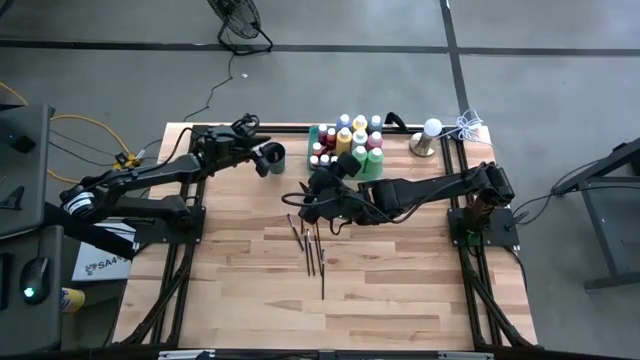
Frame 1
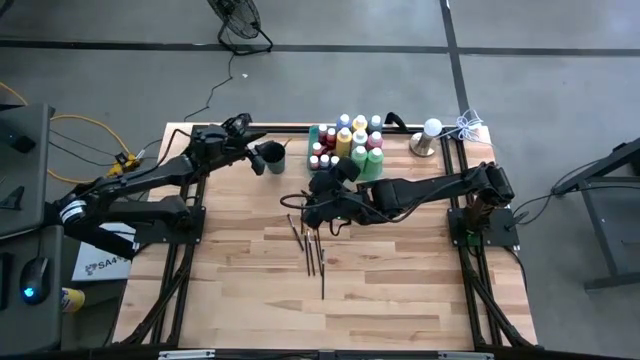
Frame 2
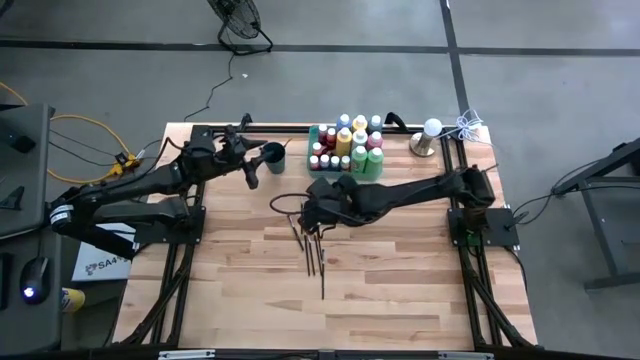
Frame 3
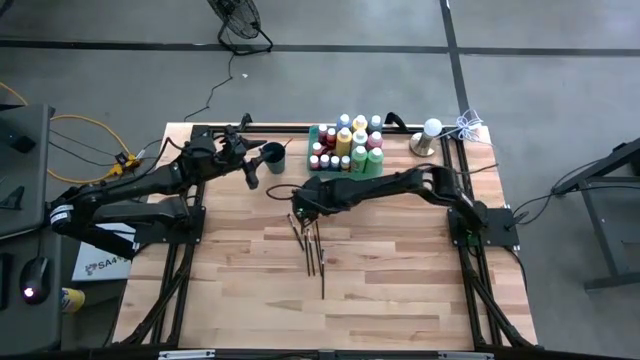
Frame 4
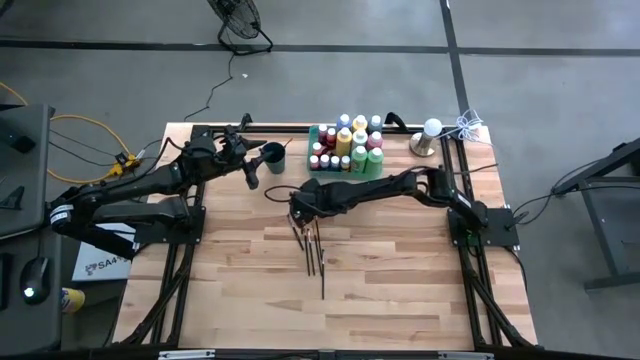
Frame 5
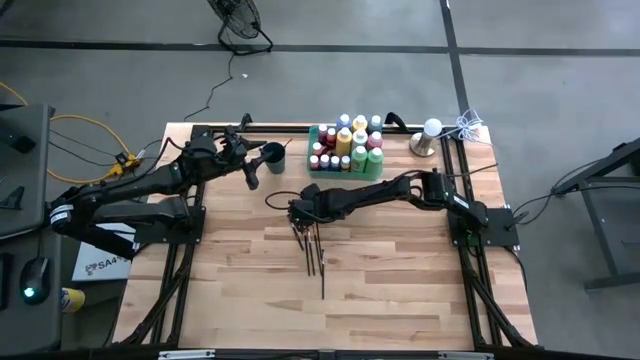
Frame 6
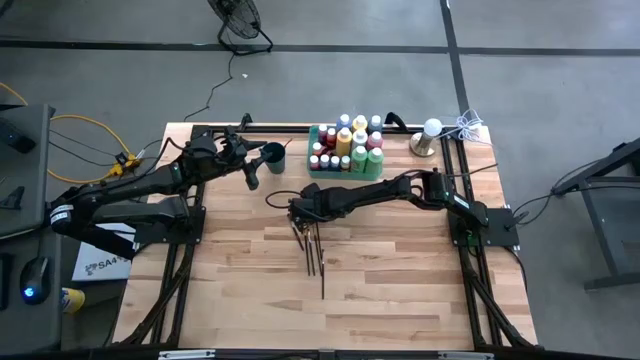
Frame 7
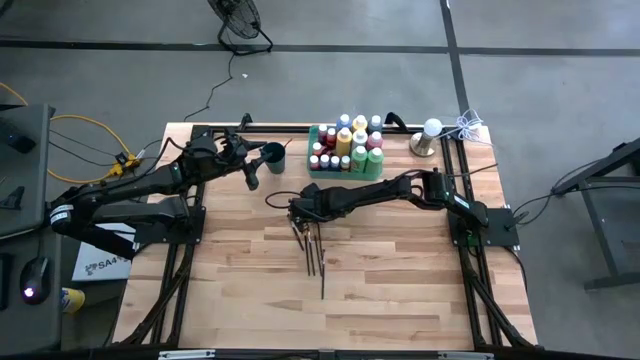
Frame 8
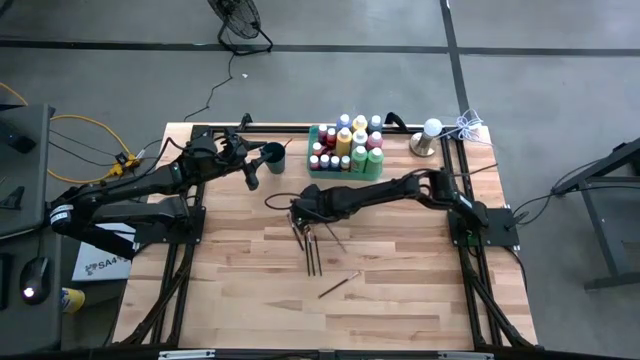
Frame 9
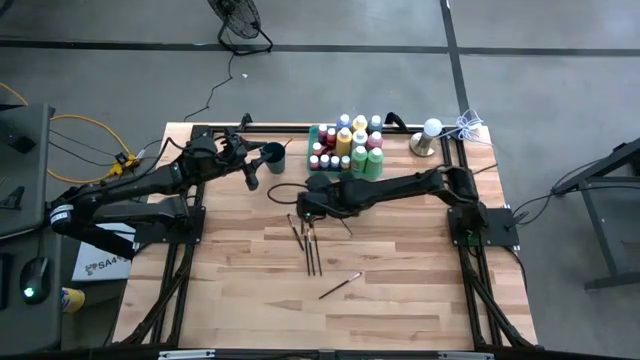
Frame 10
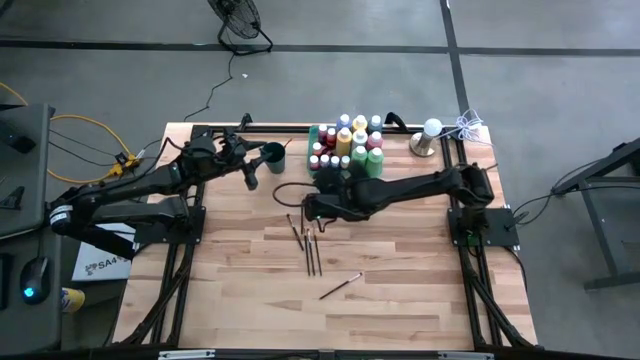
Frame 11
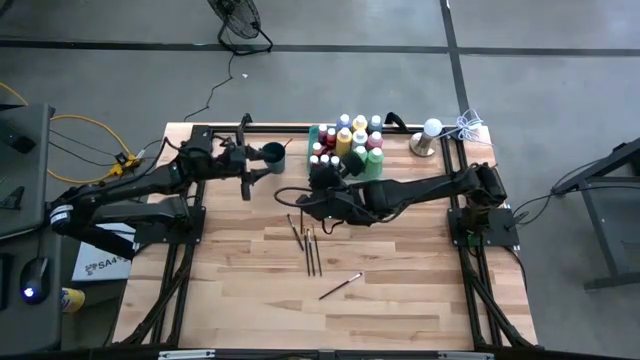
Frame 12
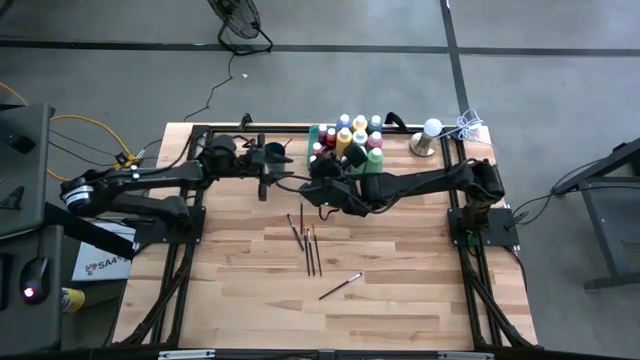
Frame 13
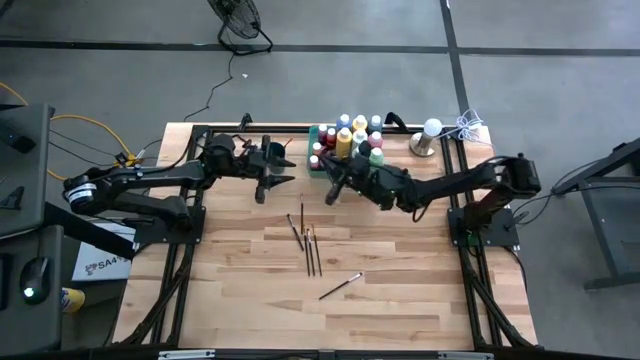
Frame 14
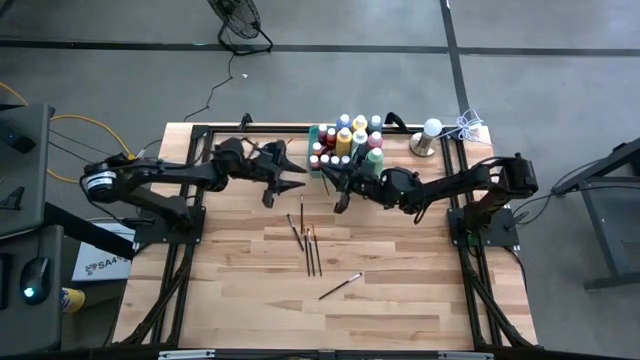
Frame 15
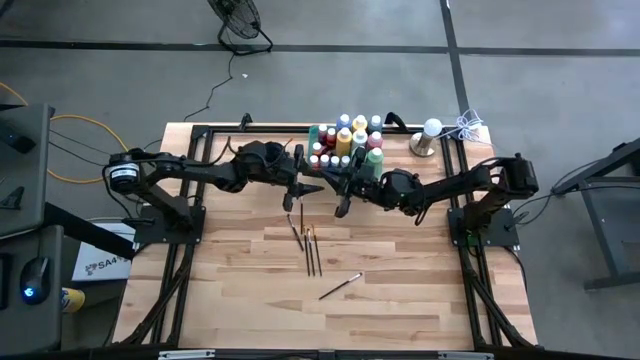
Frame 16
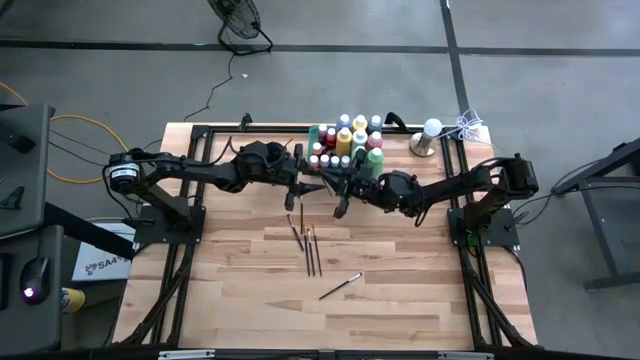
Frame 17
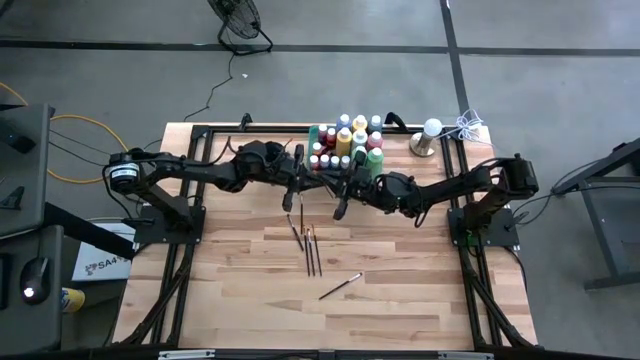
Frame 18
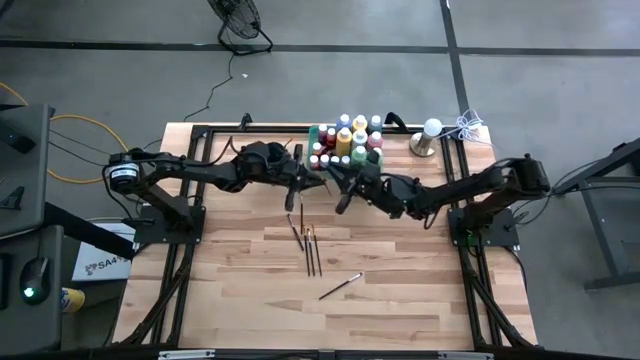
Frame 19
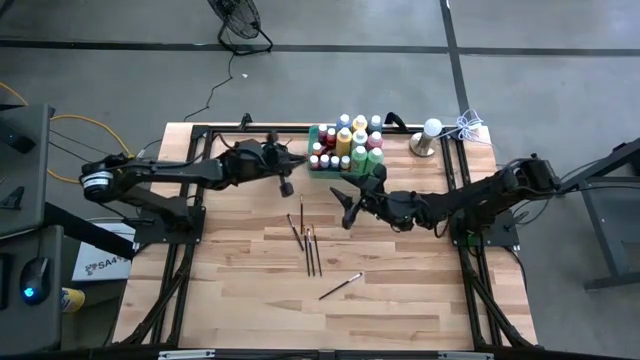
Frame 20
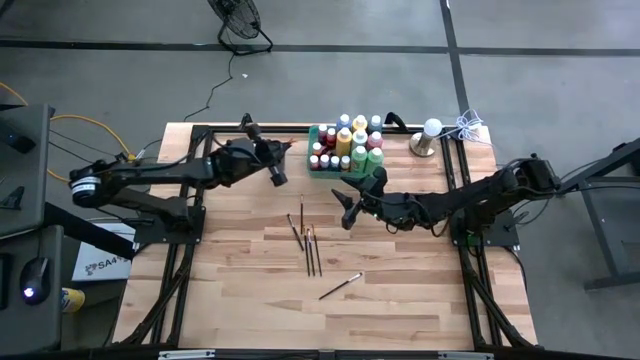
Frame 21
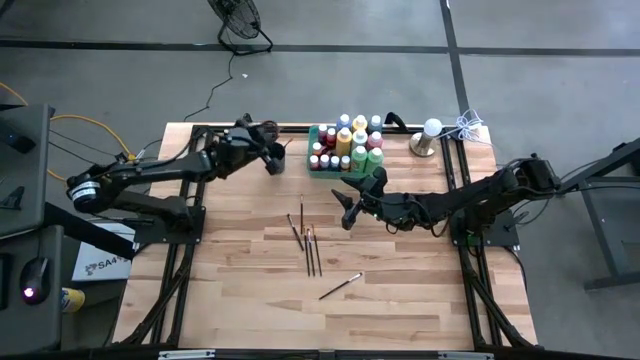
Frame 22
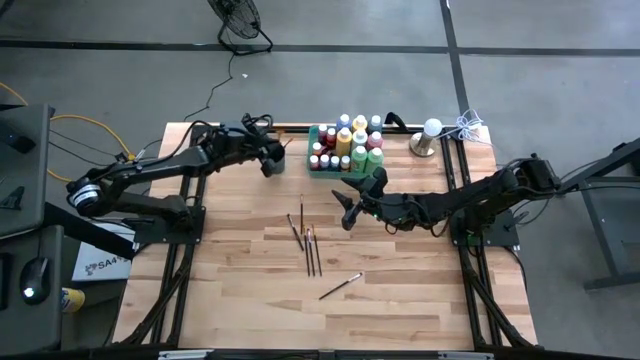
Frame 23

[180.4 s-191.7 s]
Task: Pick & Place Paint Supplies
Put the gold black paint brush into the blue cup

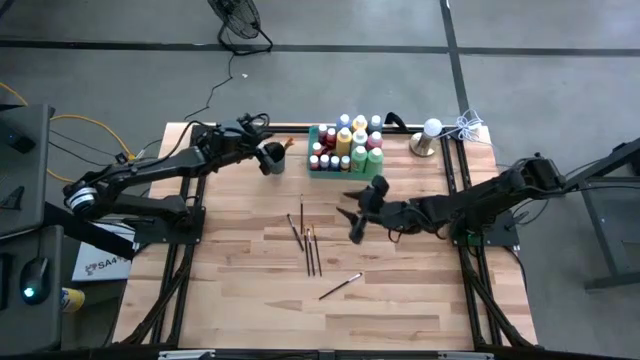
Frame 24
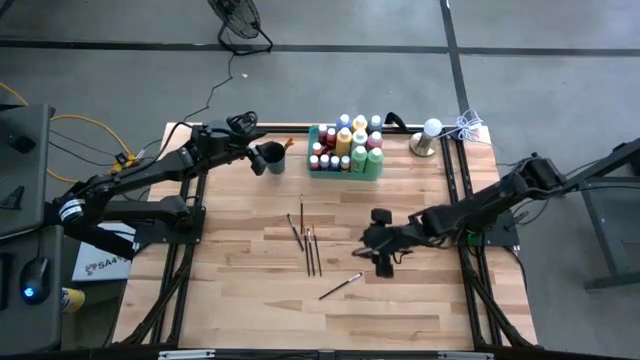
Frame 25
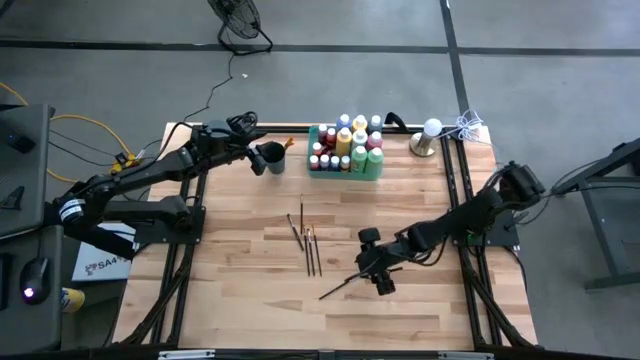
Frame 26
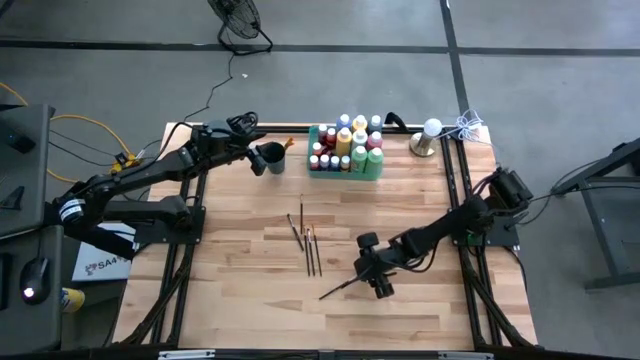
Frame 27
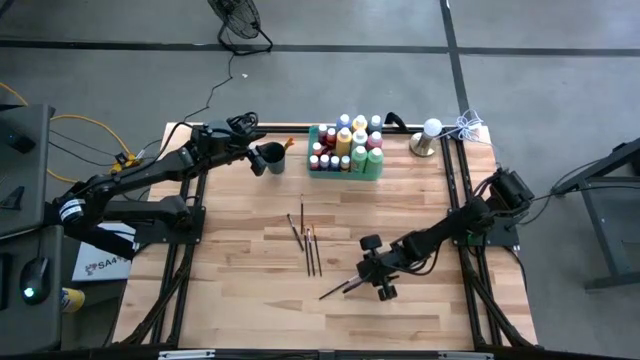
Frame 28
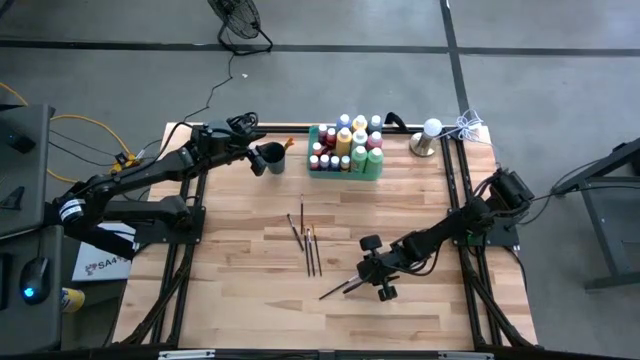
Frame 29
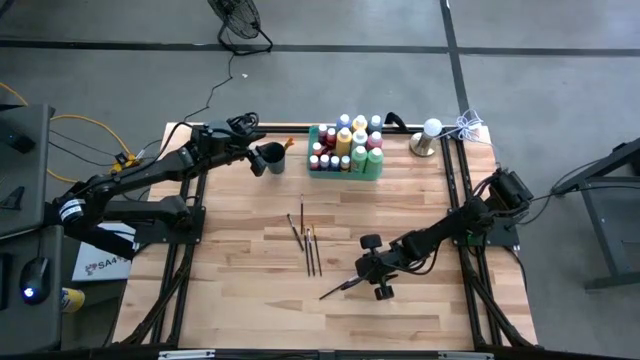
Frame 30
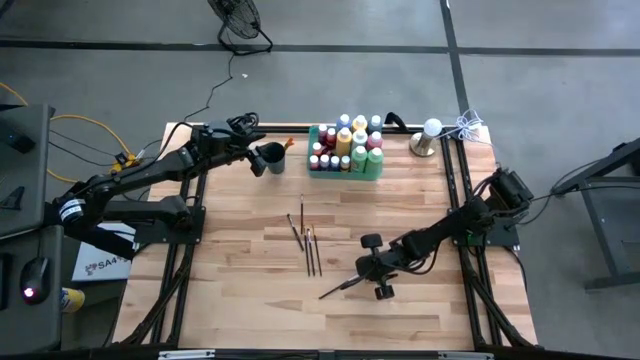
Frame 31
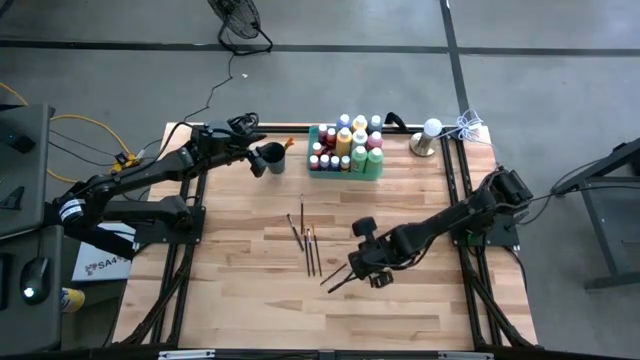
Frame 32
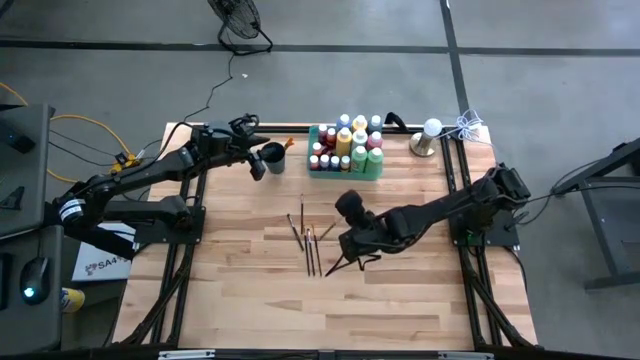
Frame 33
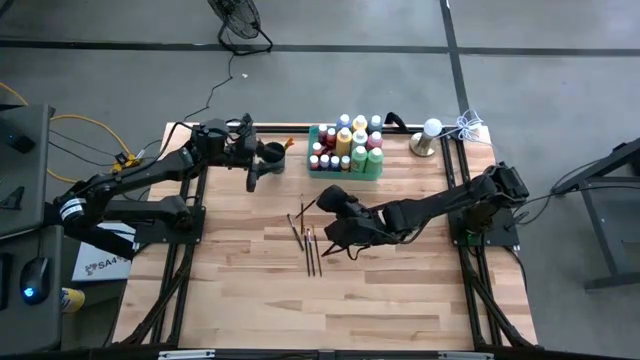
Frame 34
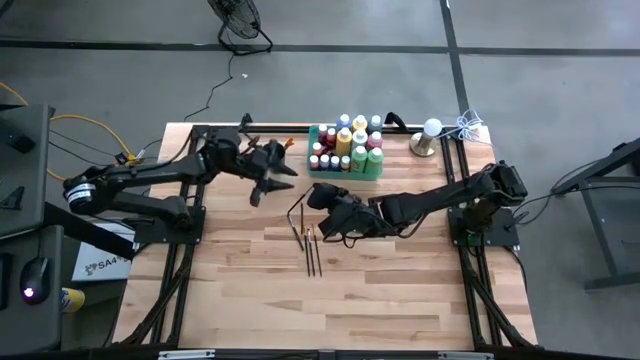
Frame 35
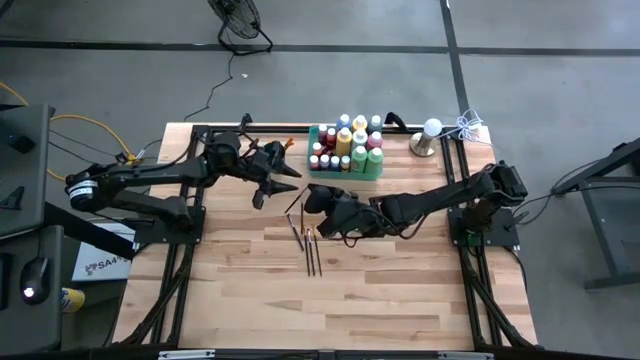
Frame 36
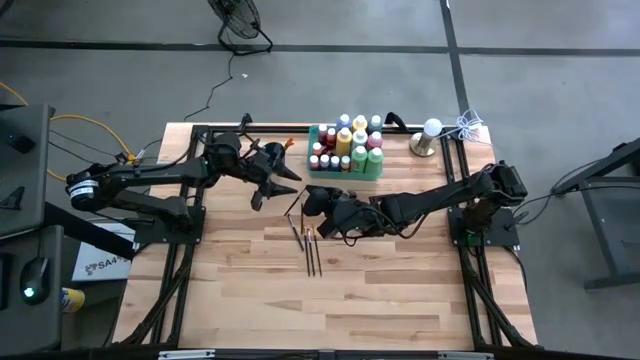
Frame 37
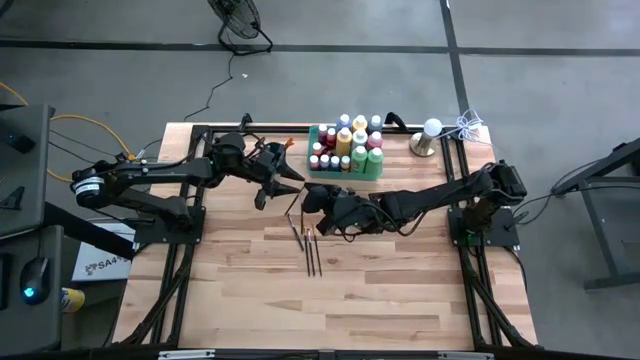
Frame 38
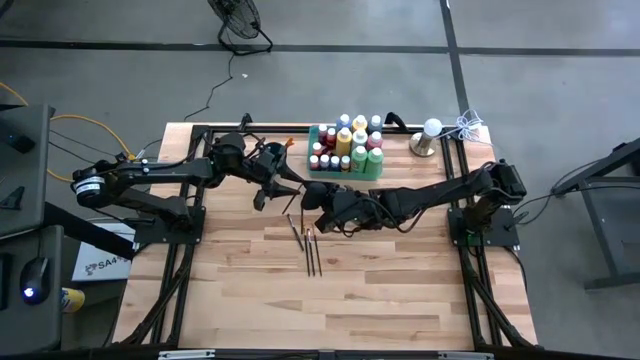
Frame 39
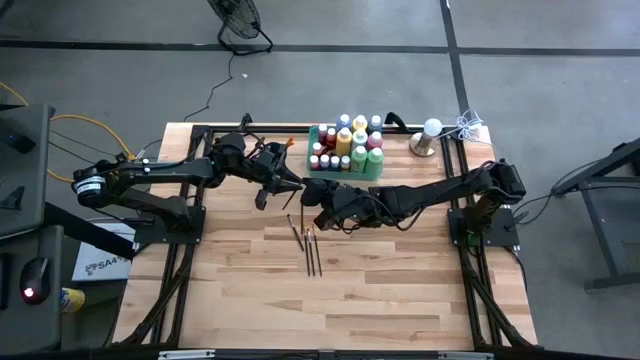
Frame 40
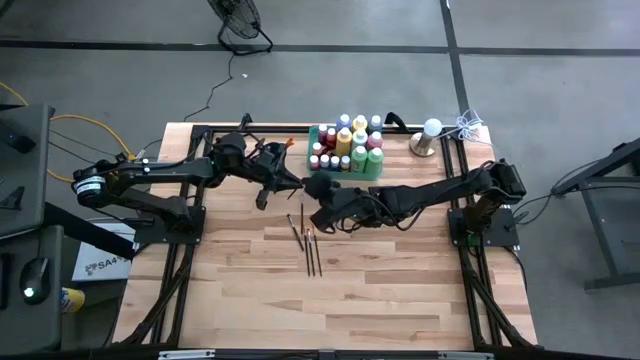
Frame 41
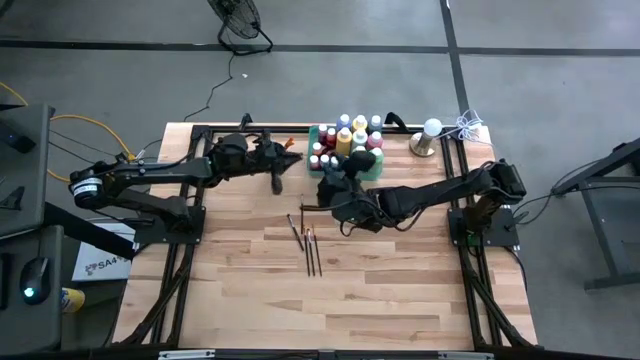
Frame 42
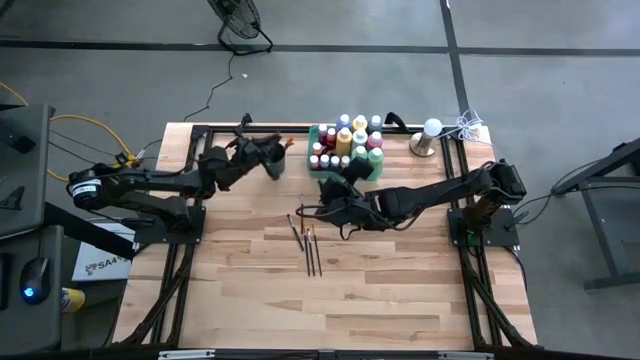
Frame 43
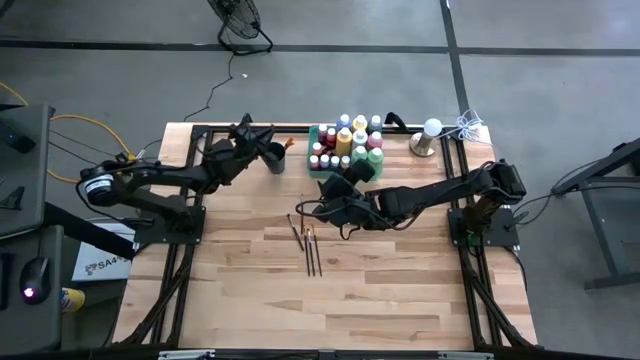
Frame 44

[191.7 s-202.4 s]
Put the silver black paint brush into the blue cup
